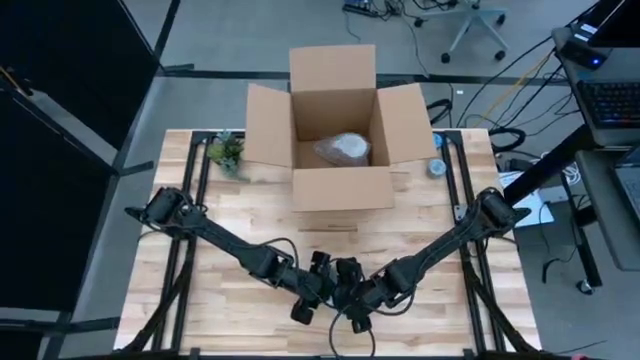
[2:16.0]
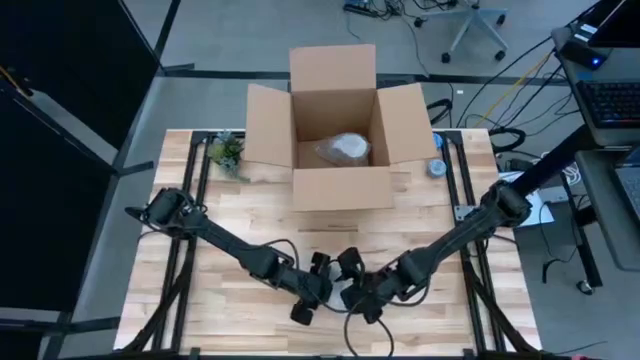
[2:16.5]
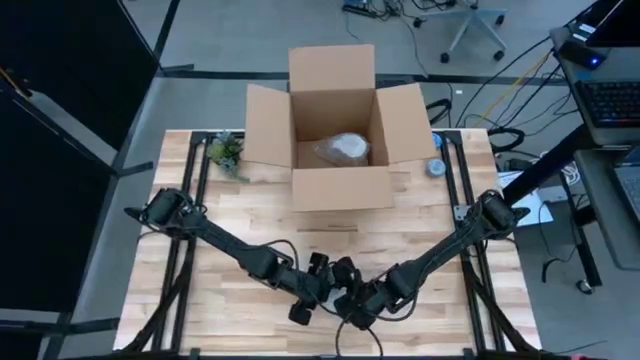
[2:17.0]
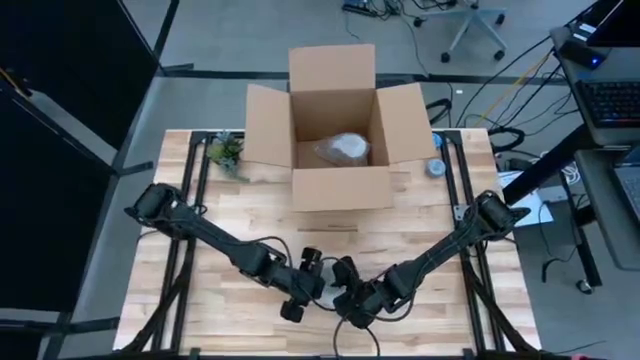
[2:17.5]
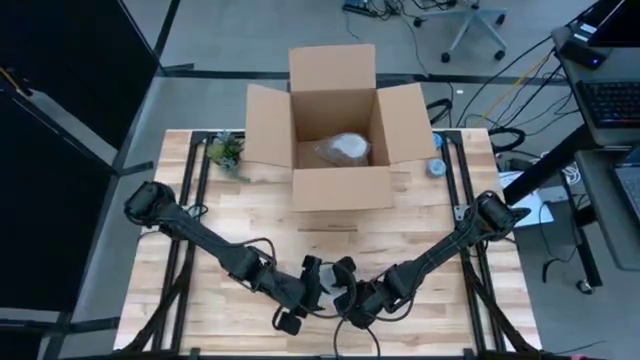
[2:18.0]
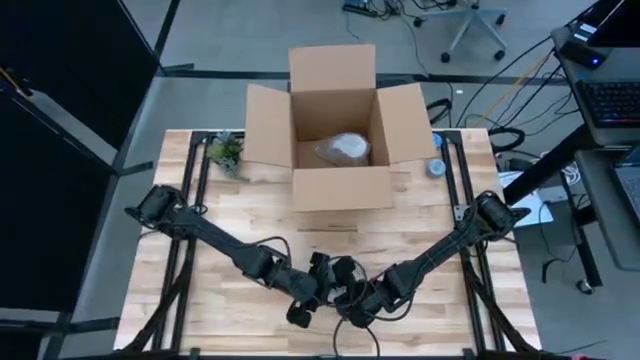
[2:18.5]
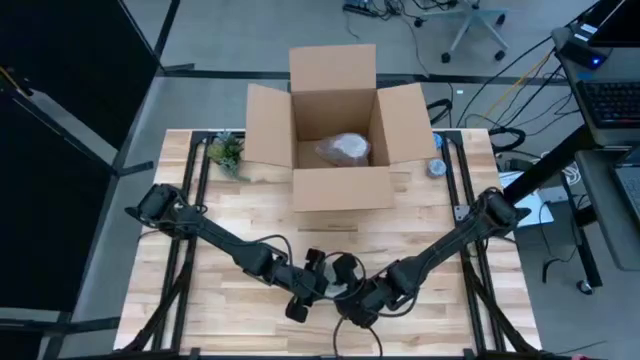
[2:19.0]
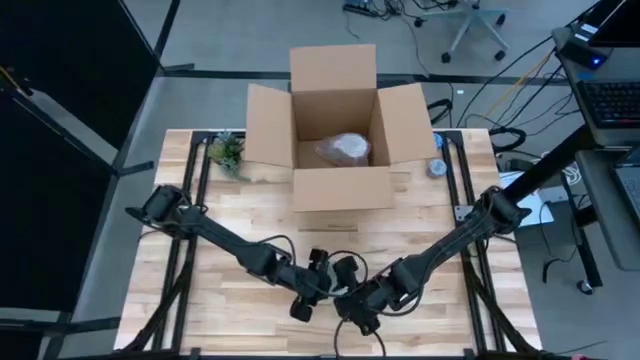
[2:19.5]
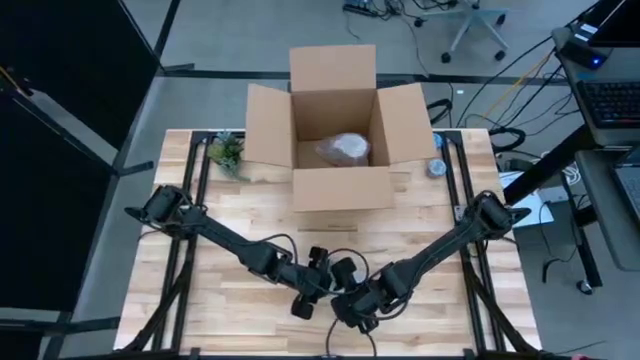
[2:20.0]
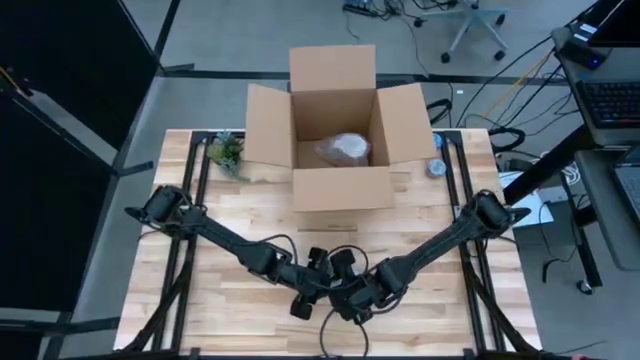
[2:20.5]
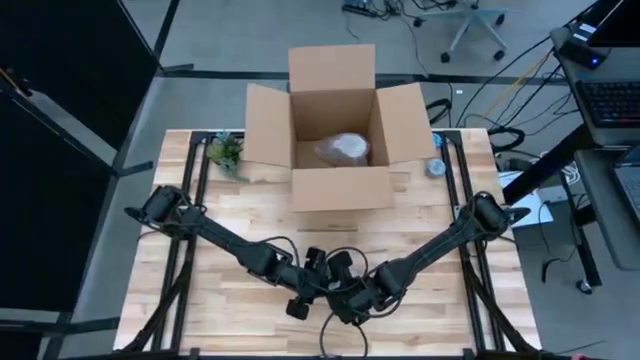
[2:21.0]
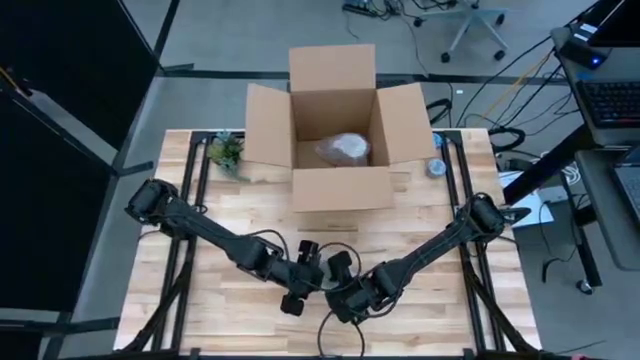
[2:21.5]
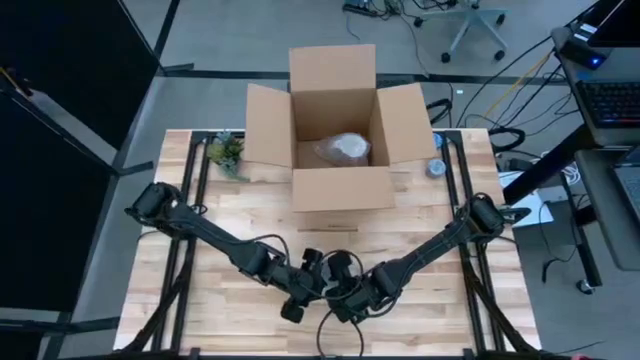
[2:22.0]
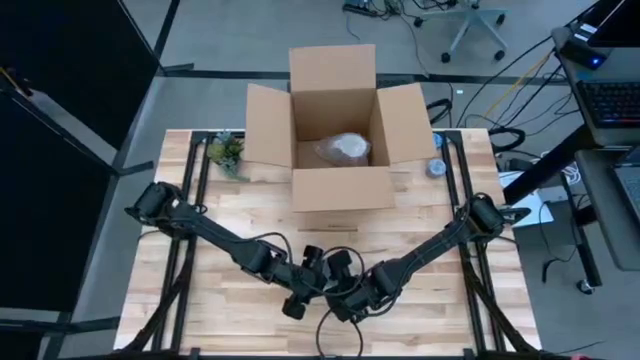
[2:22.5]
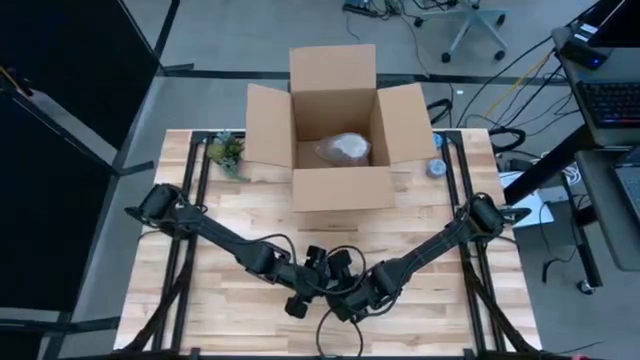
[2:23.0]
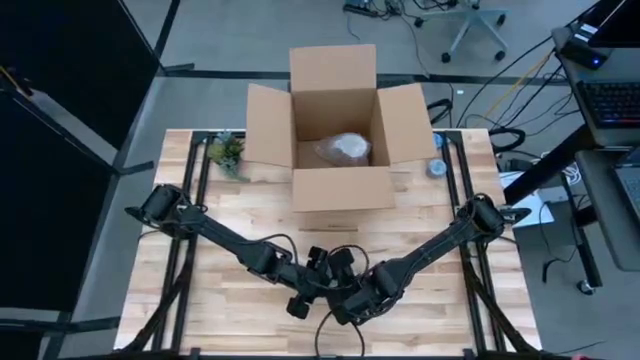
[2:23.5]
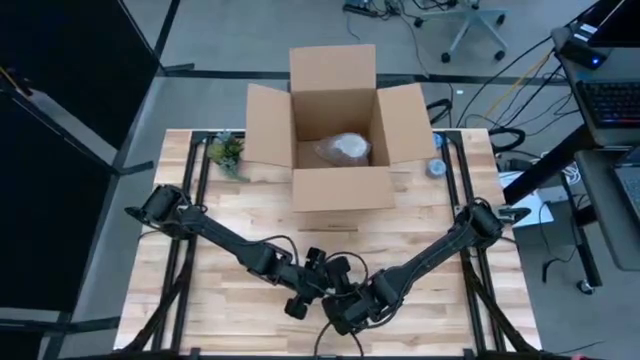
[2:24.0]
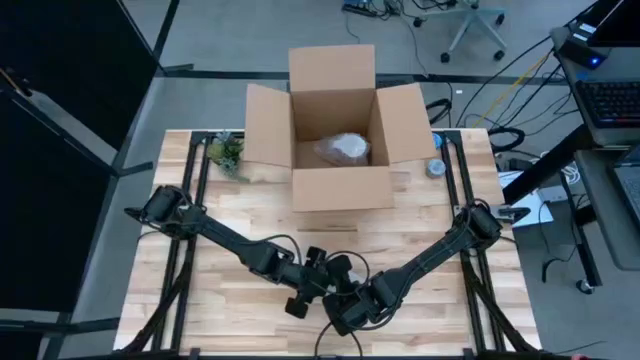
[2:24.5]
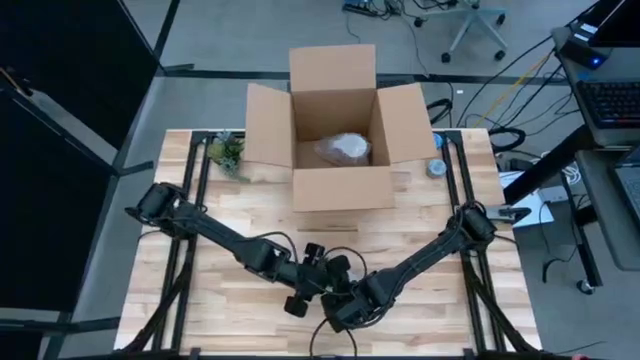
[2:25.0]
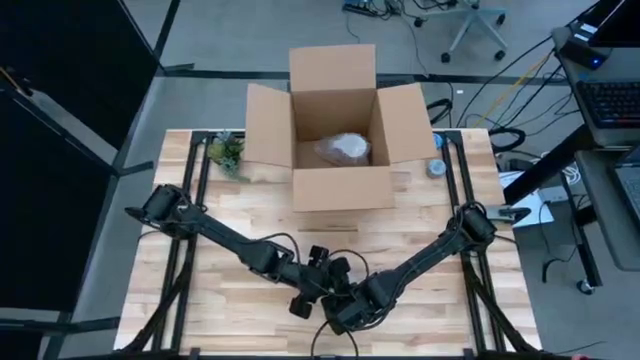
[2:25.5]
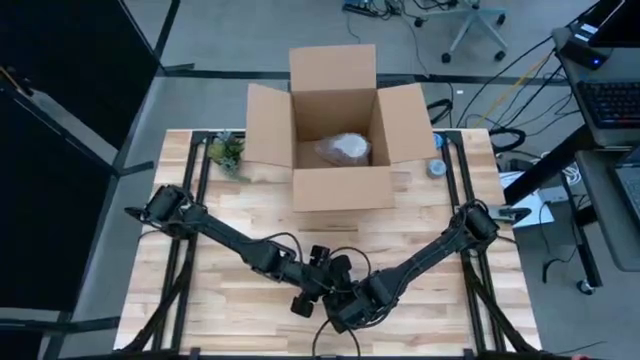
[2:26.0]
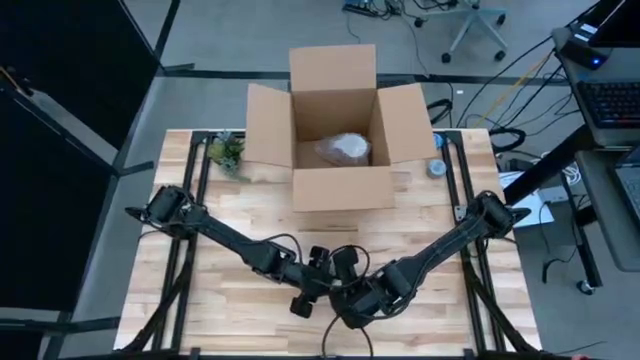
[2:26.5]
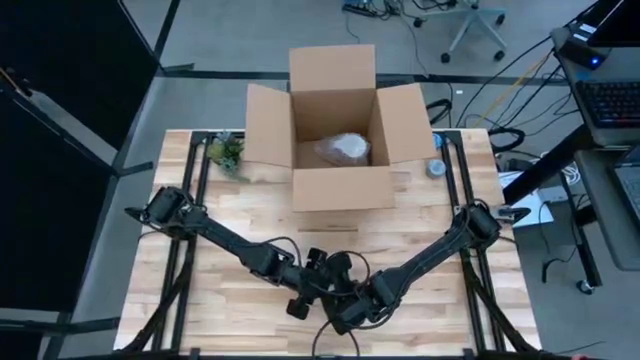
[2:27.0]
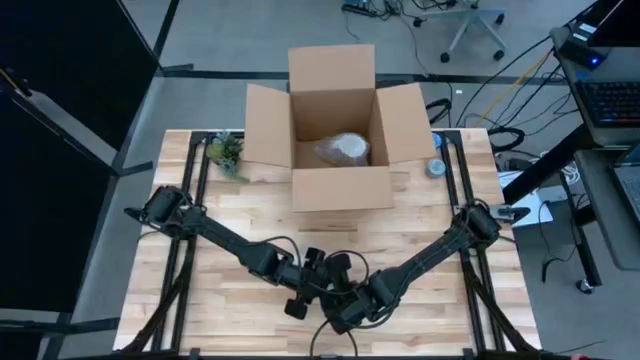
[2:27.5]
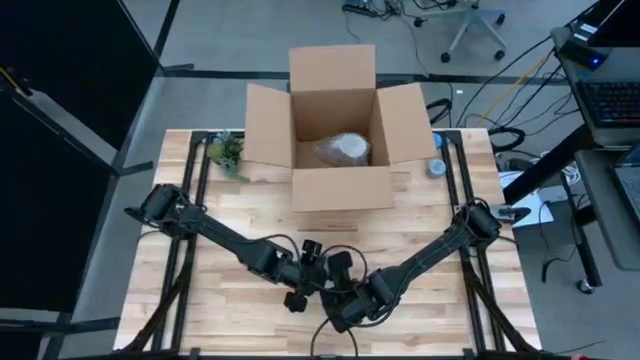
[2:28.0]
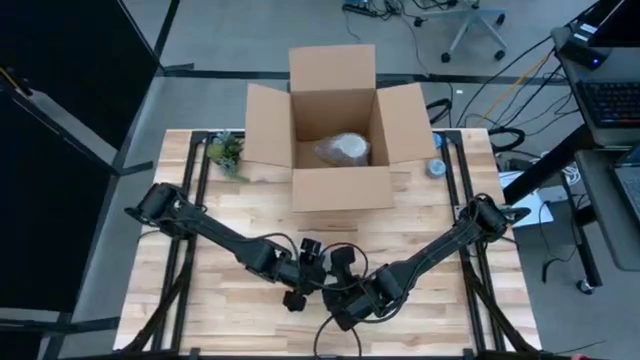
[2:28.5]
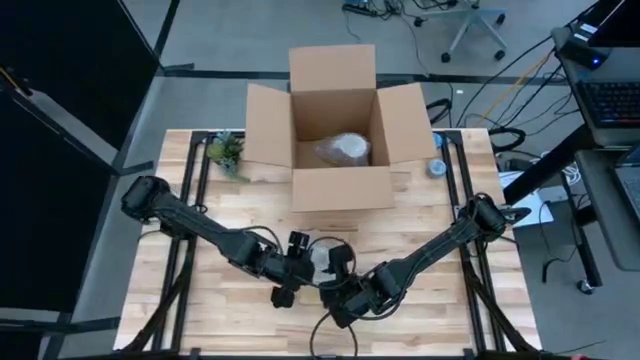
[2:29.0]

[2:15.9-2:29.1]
Task: wrap mug
Wrap the orange mug with bubble wrap

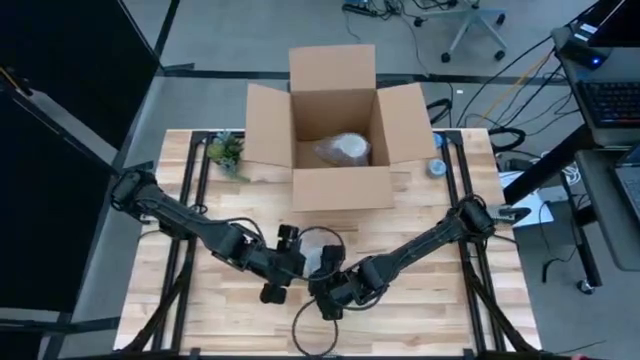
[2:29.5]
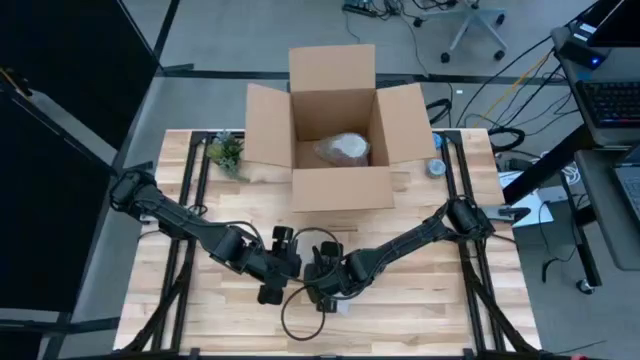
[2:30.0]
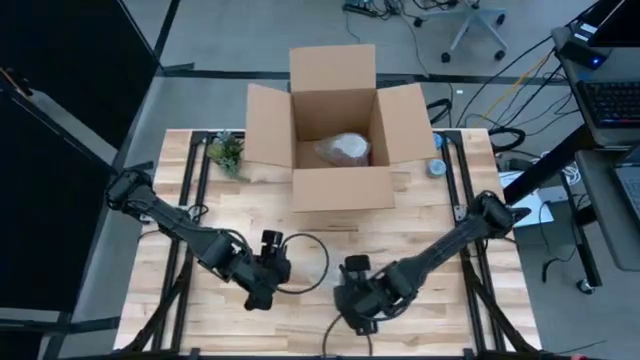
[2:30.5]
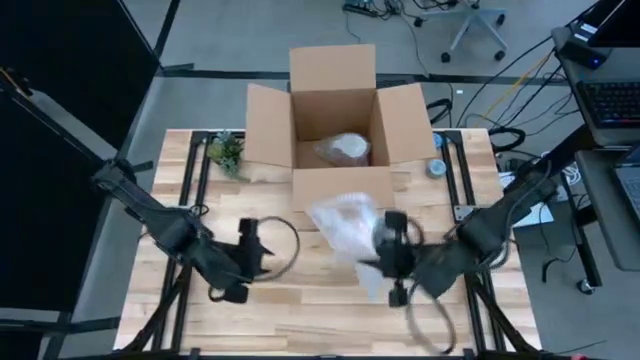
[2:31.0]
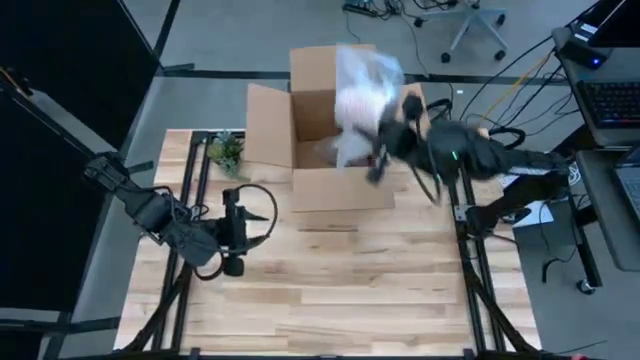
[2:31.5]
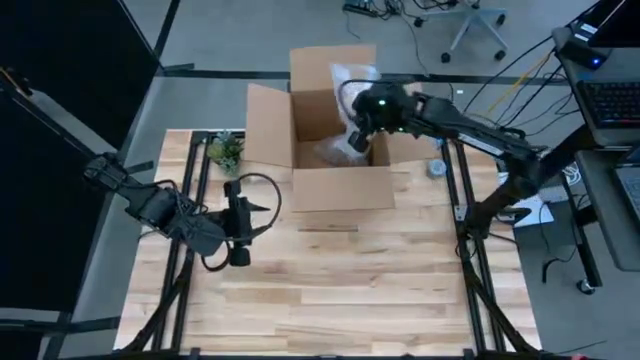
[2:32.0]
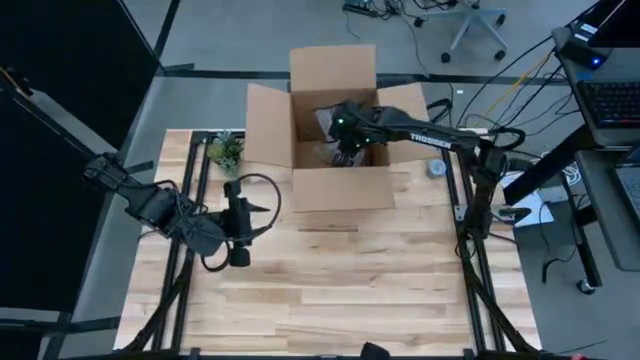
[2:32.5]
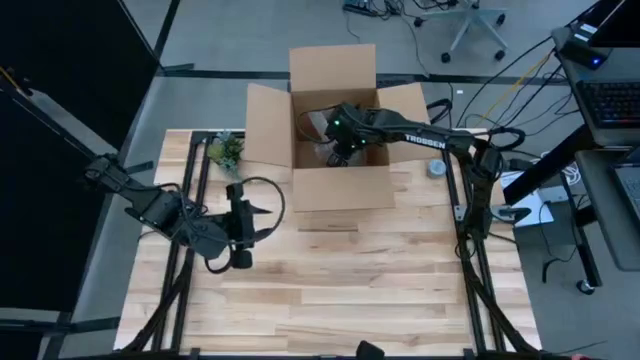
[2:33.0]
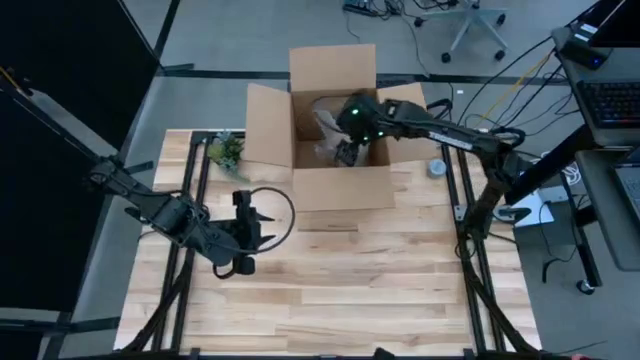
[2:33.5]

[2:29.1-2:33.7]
Put the wrapped orange mug into the cardboard box

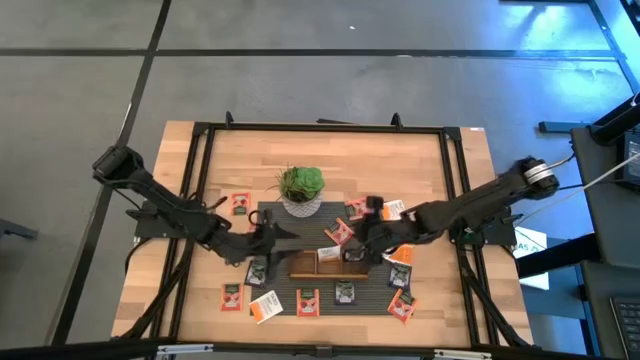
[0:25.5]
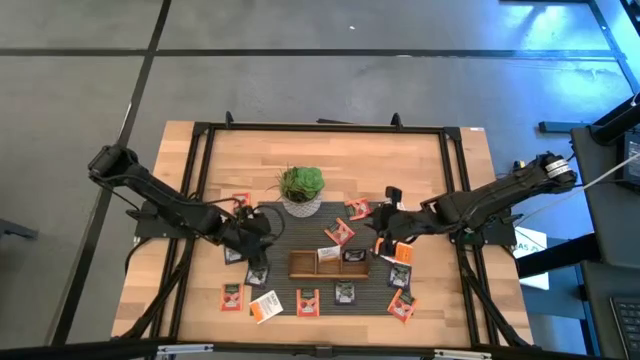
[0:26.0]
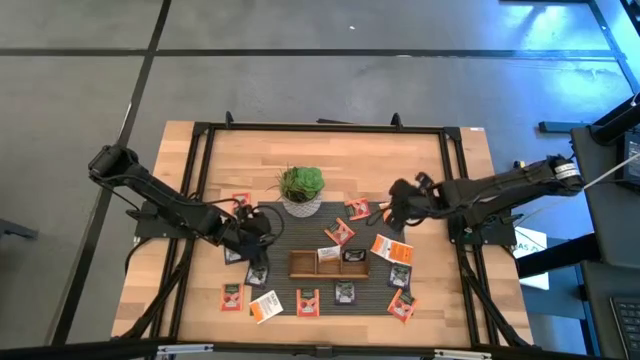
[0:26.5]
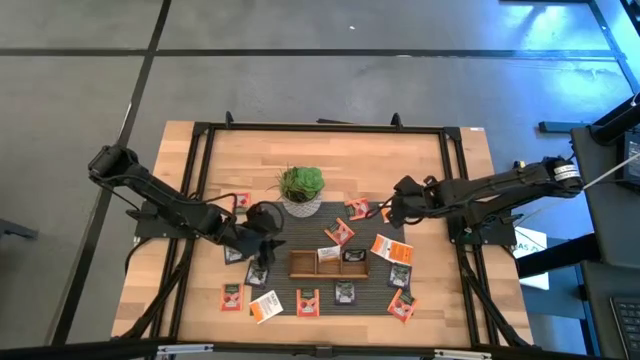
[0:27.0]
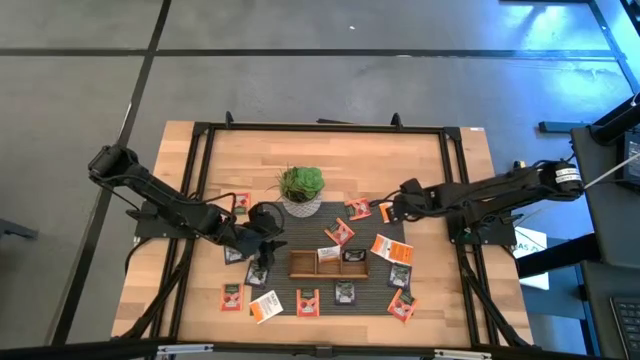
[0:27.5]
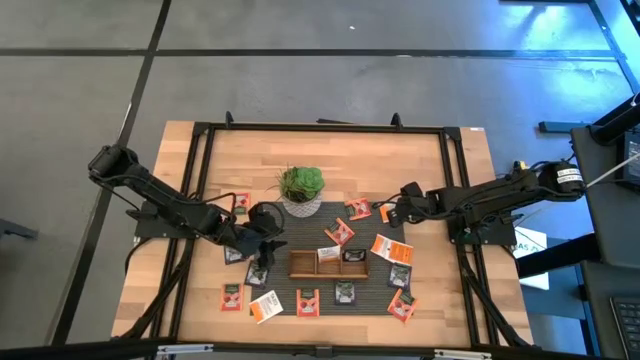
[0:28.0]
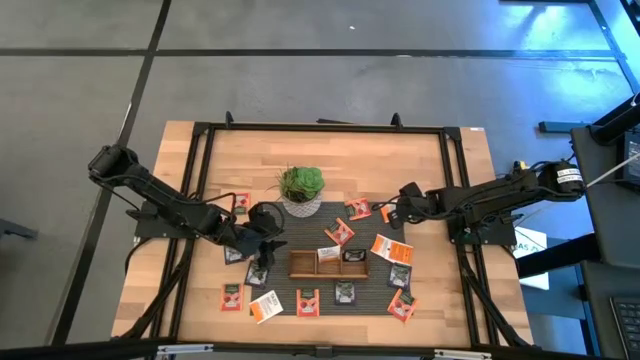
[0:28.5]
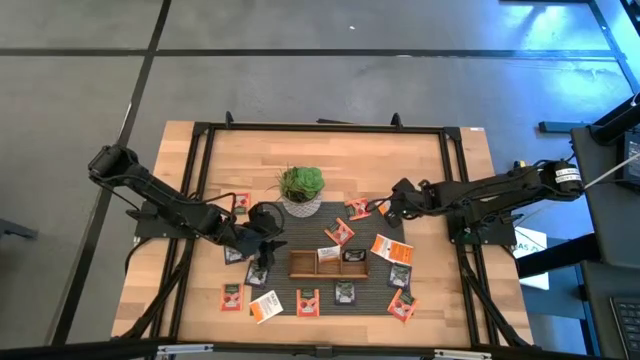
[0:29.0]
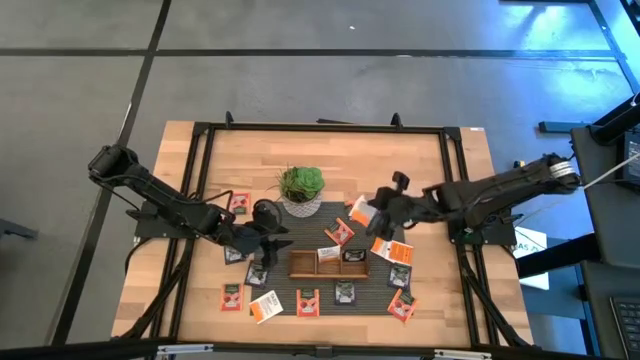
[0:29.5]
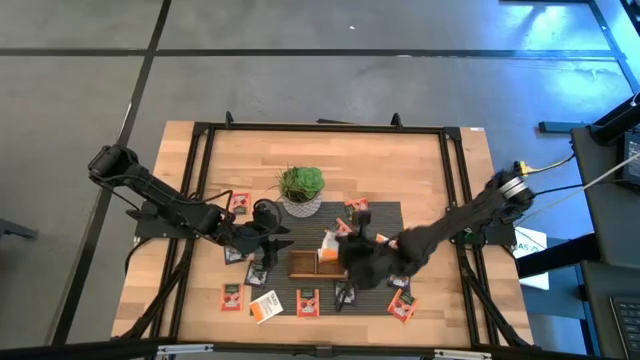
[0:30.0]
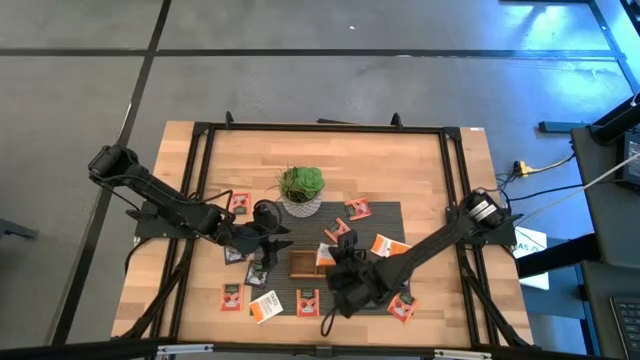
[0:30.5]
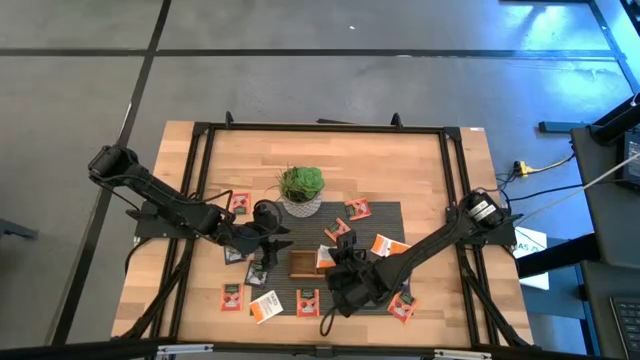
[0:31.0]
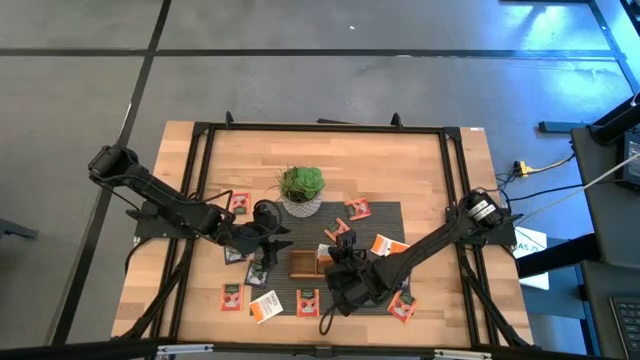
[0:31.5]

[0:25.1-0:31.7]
Task: Pick & Place Tea
Put the white tea bag into the middle of the wooden organizer
